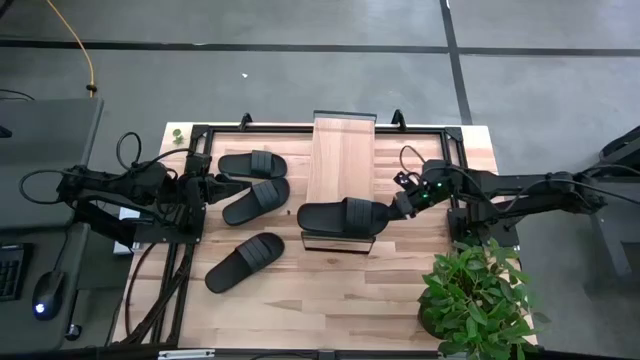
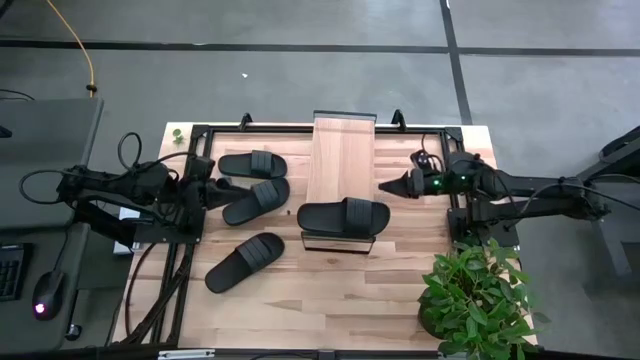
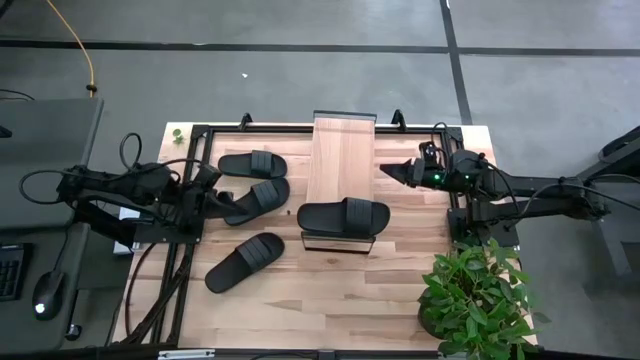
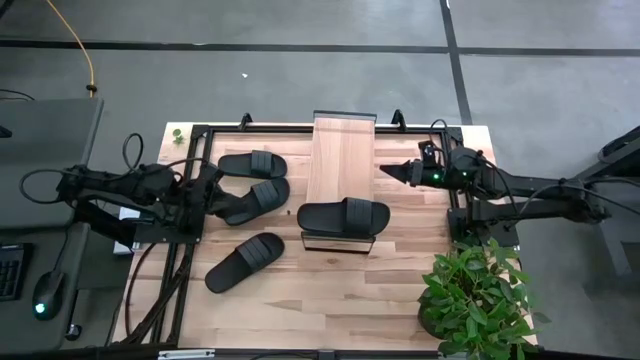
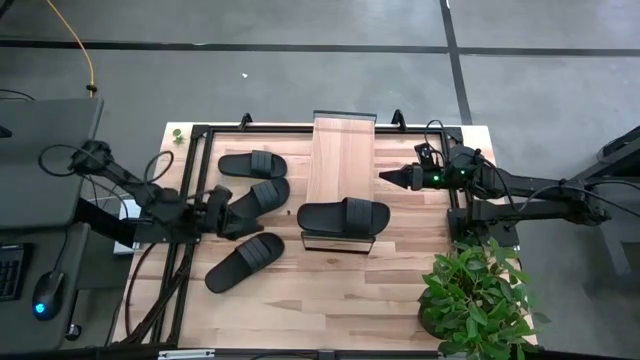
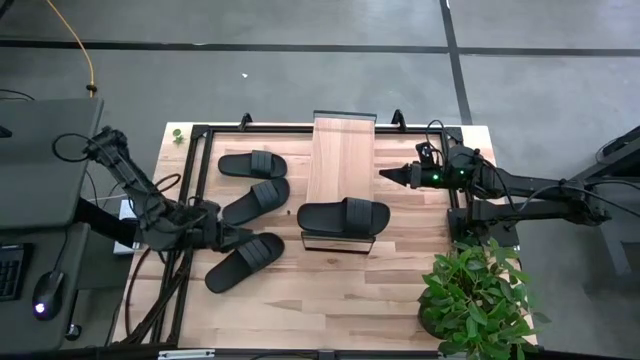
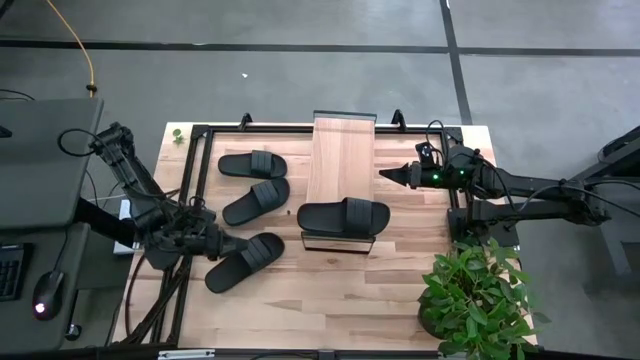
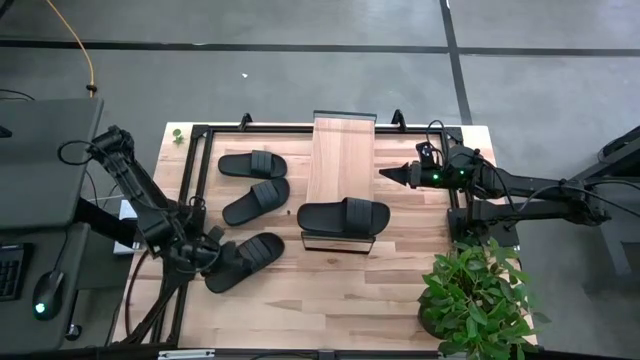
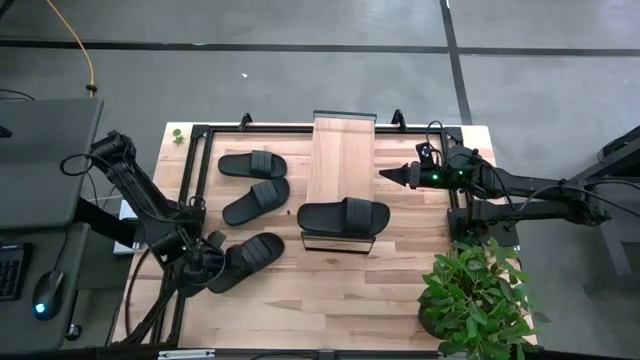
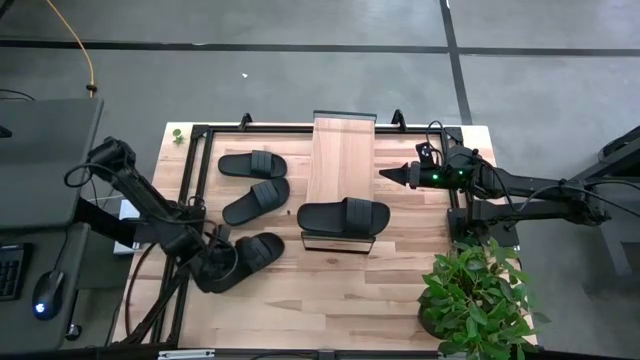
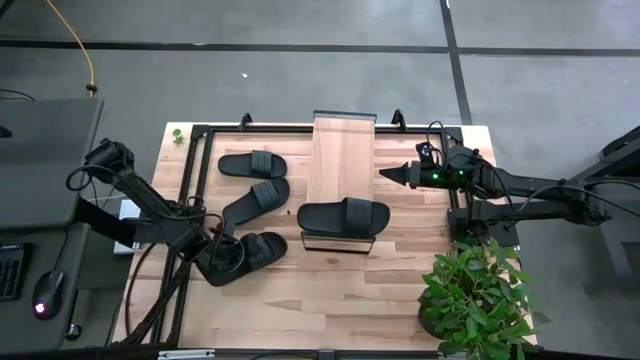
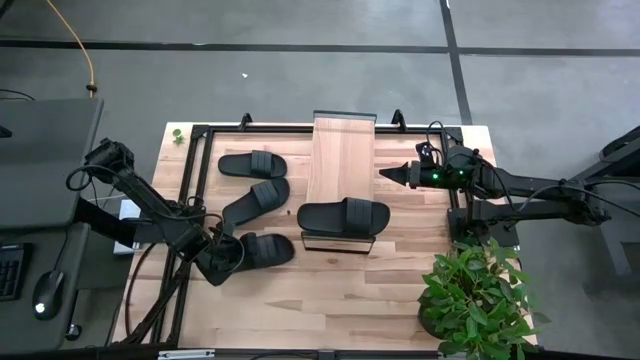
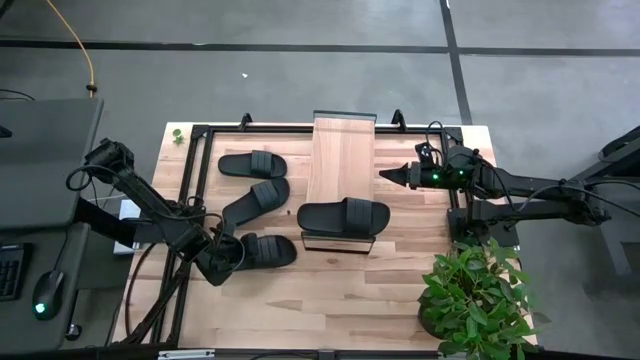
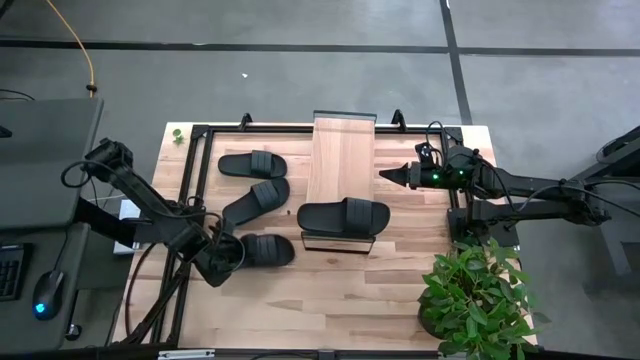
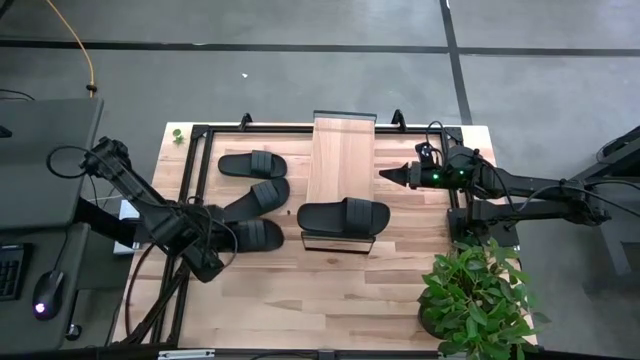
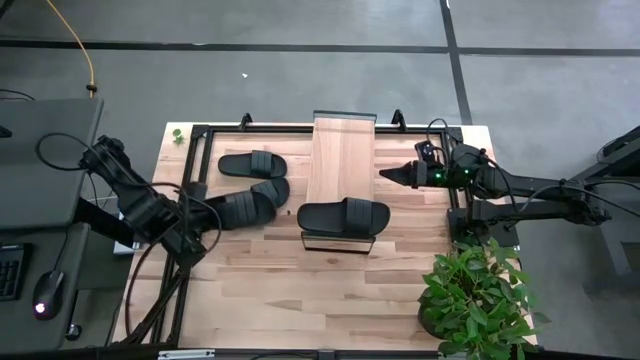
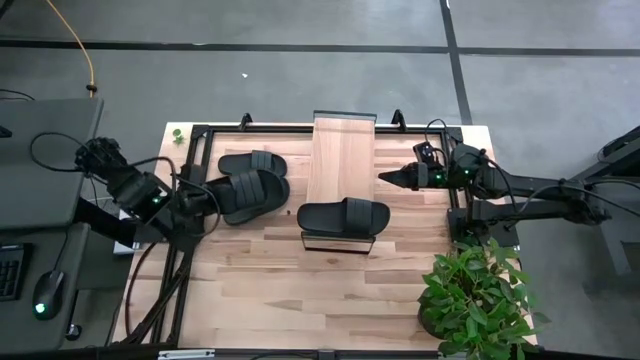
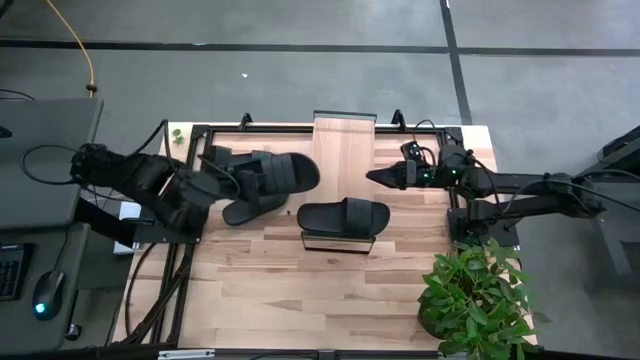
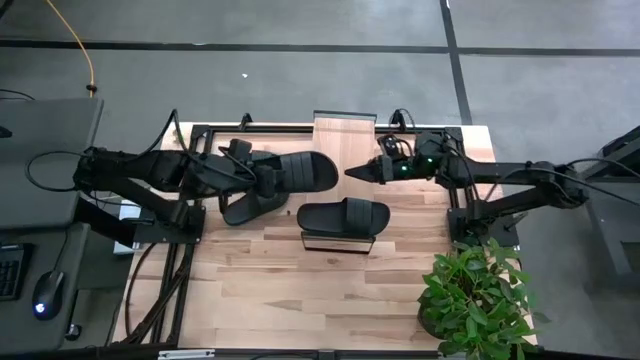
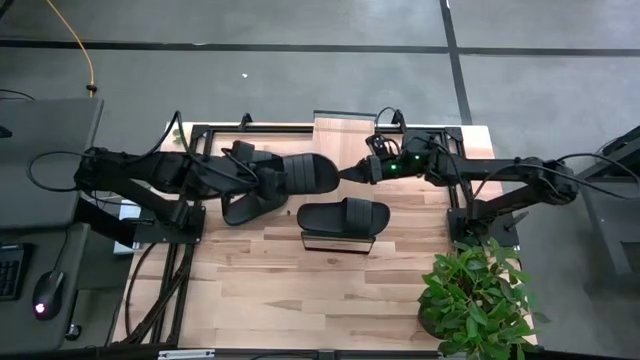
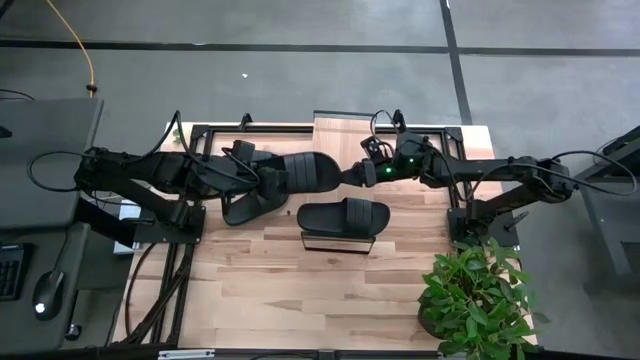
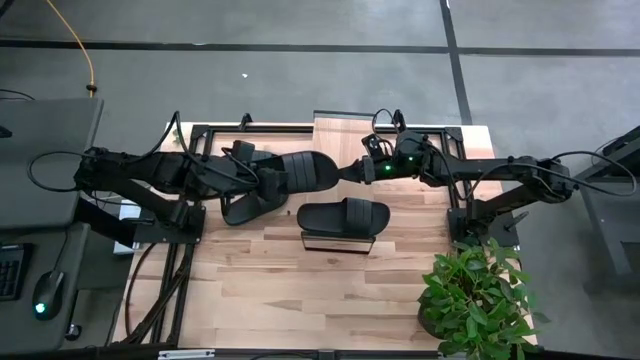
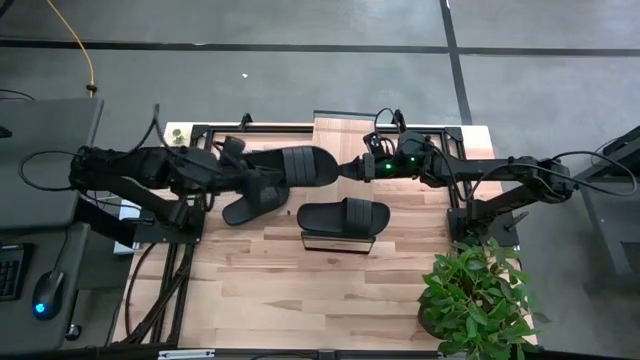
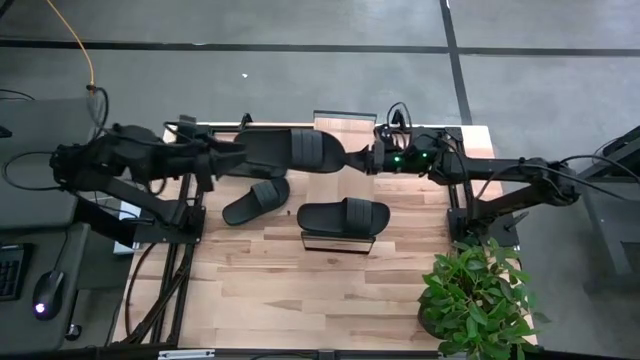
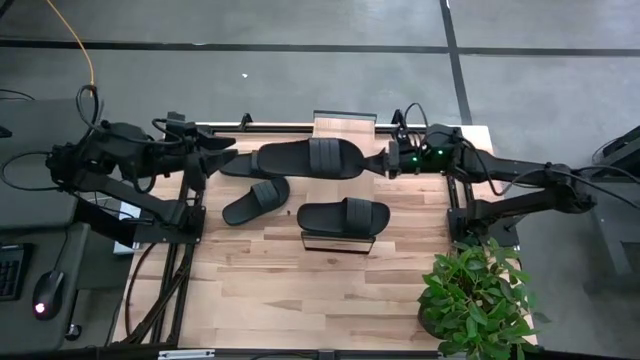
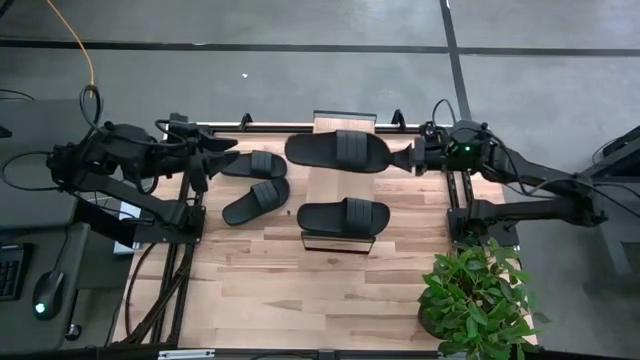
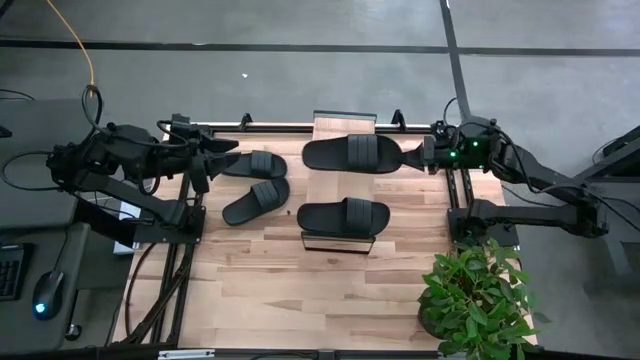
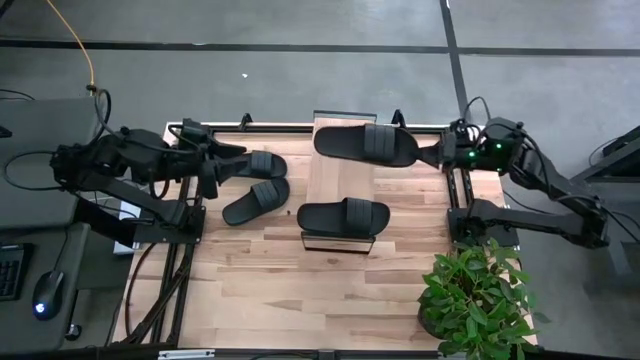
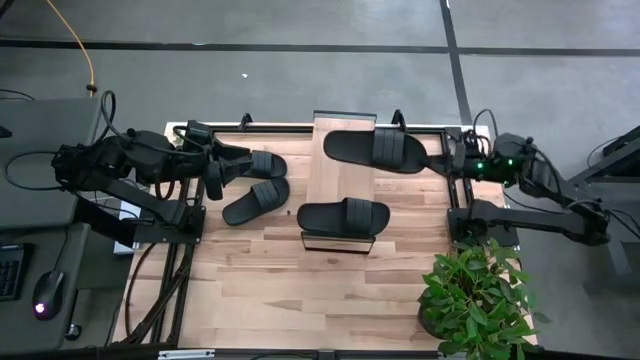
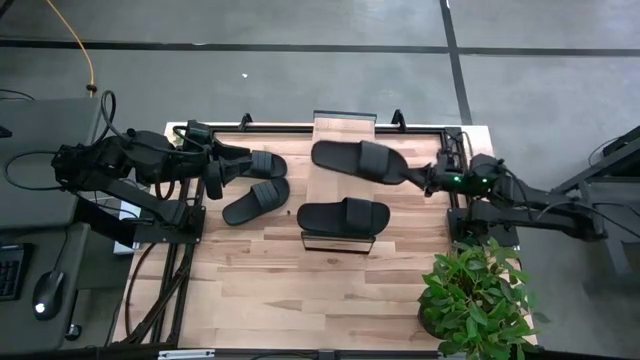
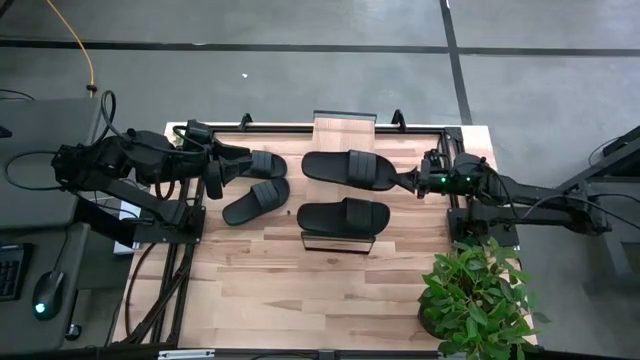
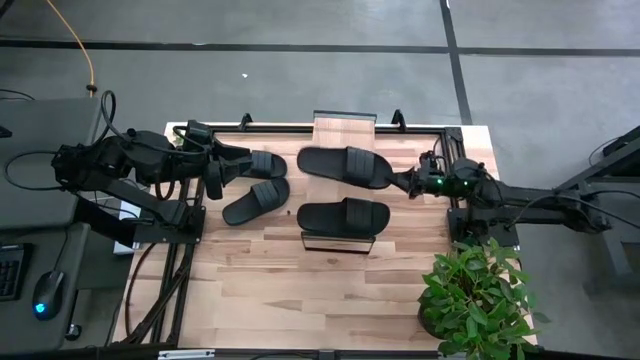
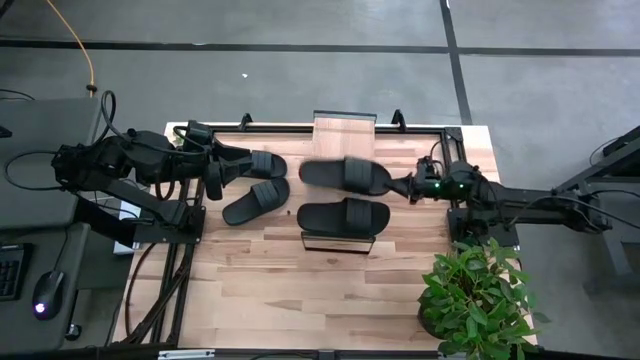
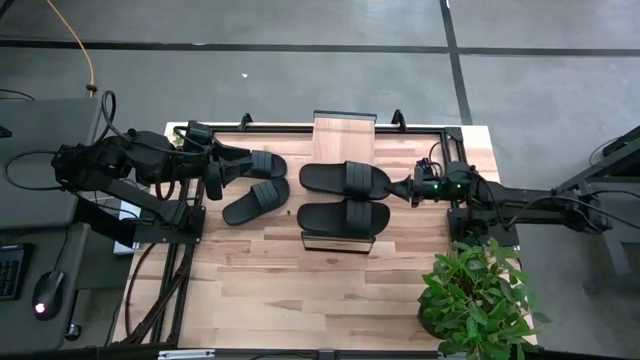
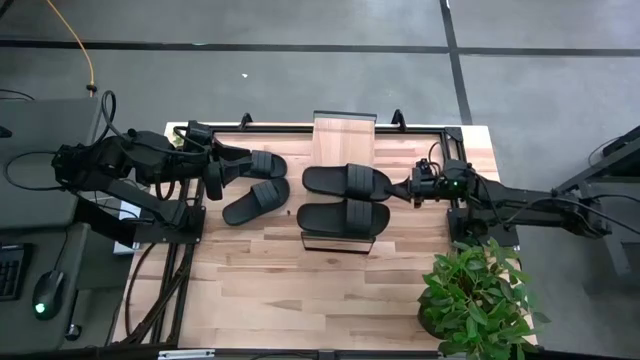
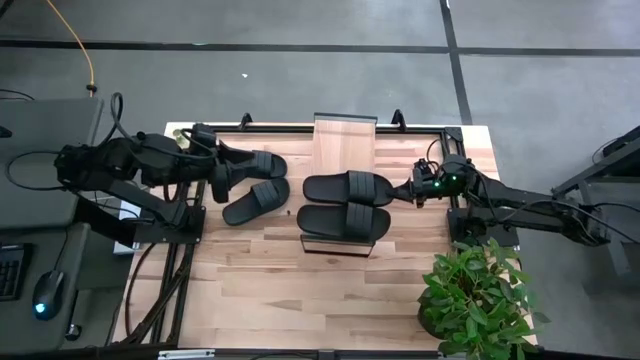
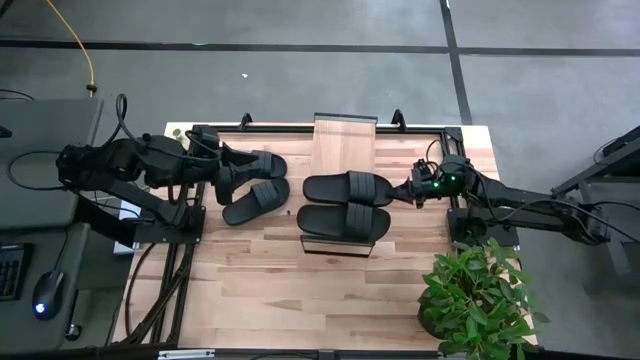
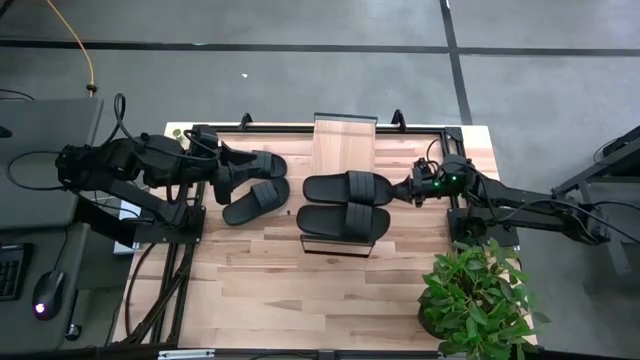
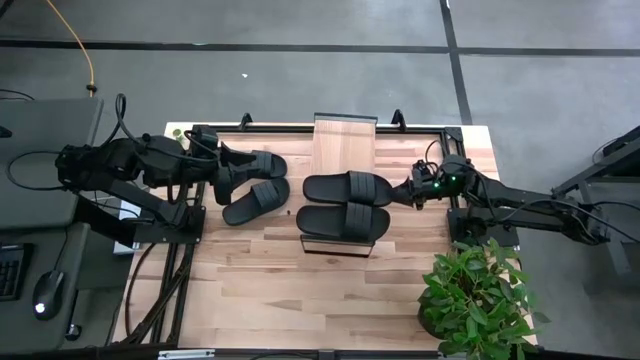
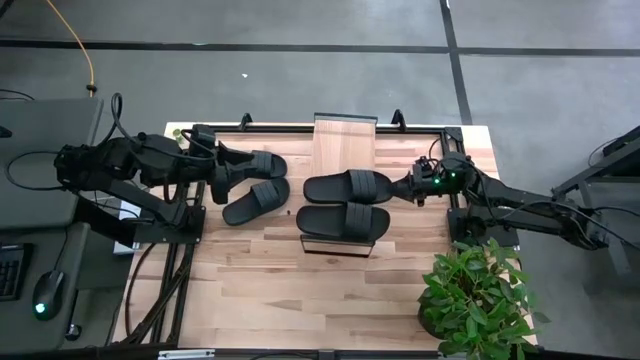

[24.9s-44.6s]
Task: Pick and place slides into the shelf
Put the black slide on the shelf
